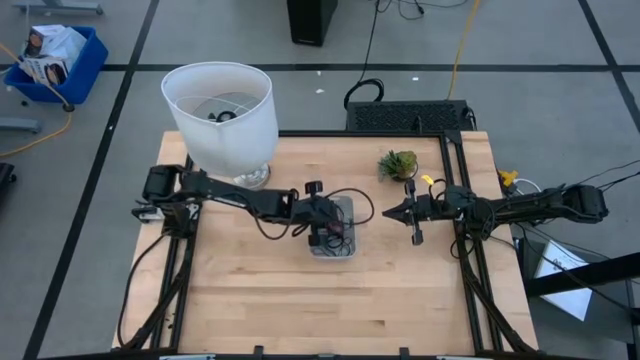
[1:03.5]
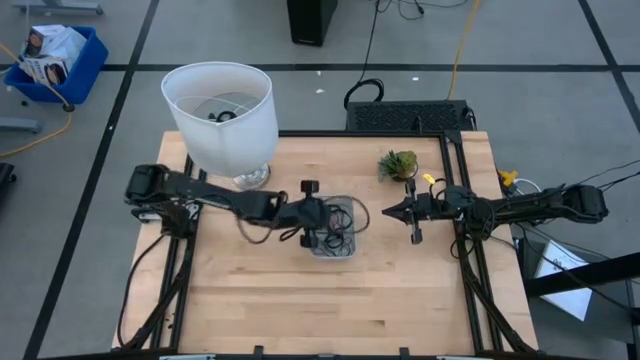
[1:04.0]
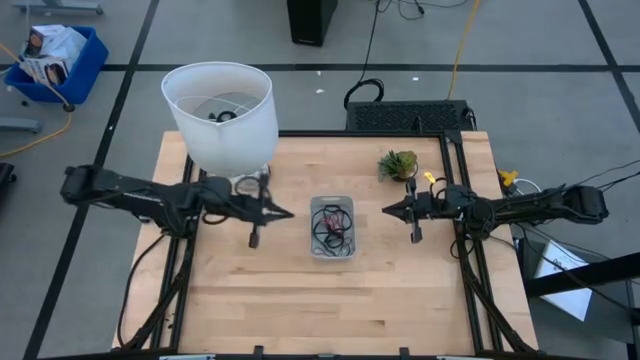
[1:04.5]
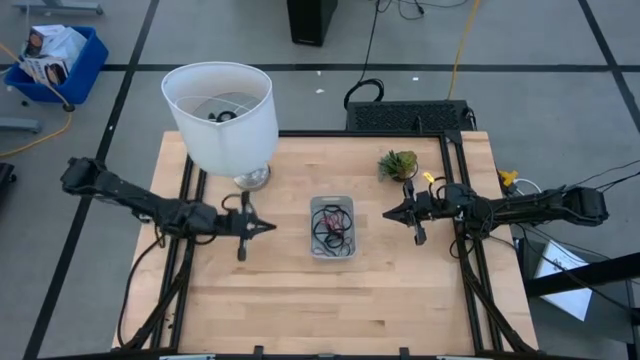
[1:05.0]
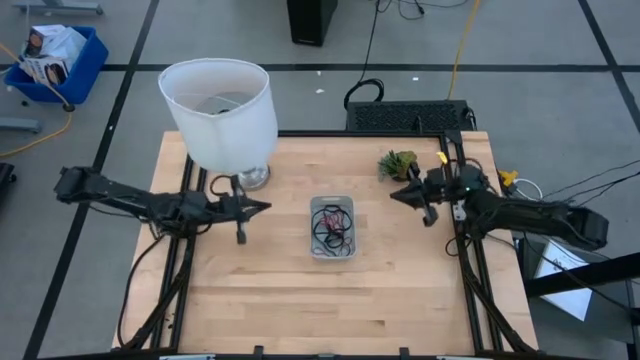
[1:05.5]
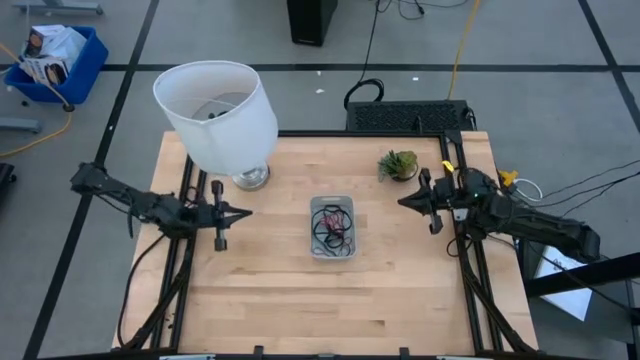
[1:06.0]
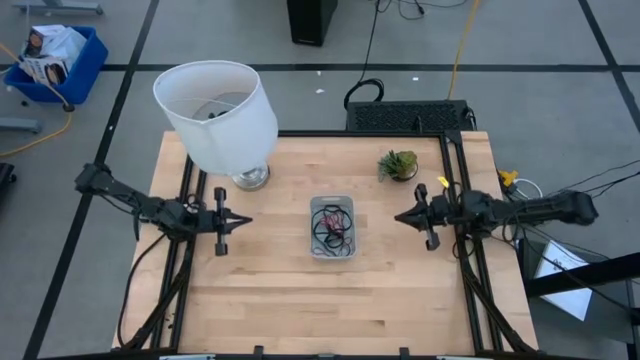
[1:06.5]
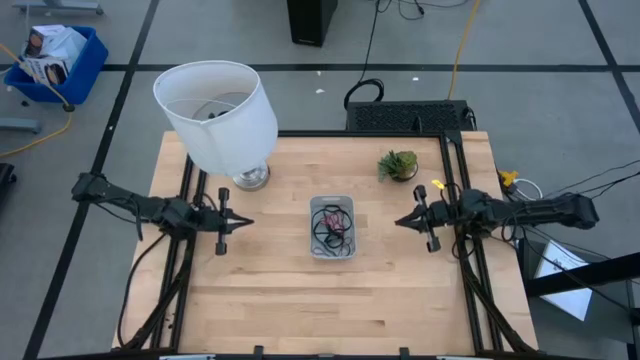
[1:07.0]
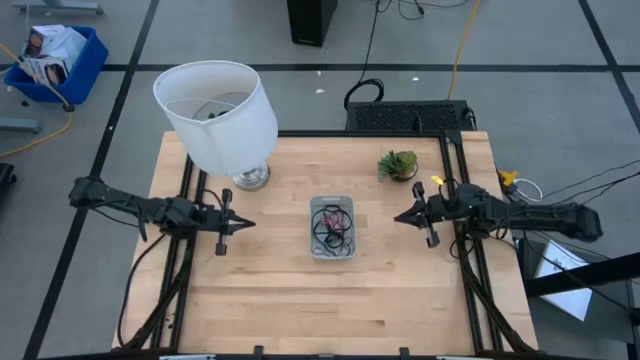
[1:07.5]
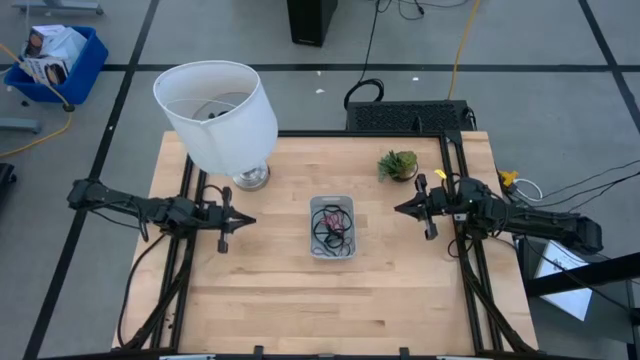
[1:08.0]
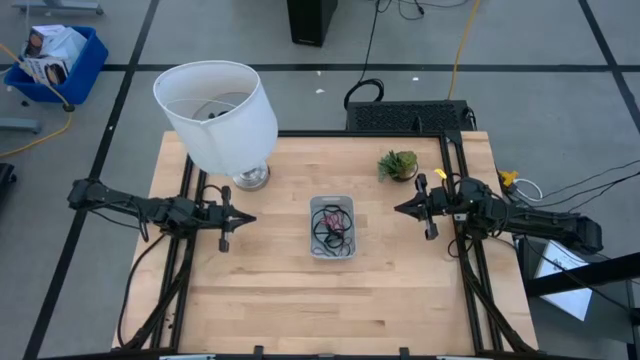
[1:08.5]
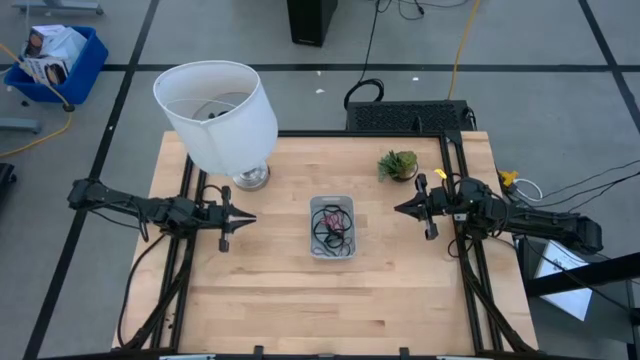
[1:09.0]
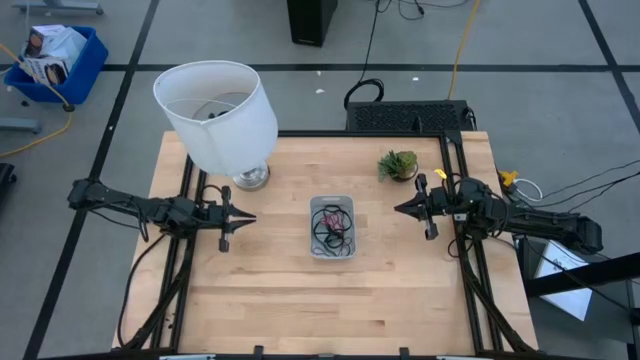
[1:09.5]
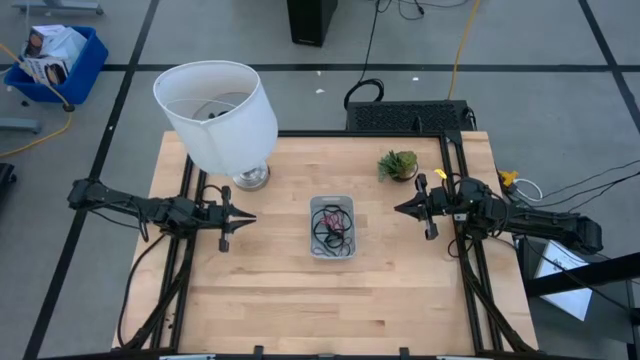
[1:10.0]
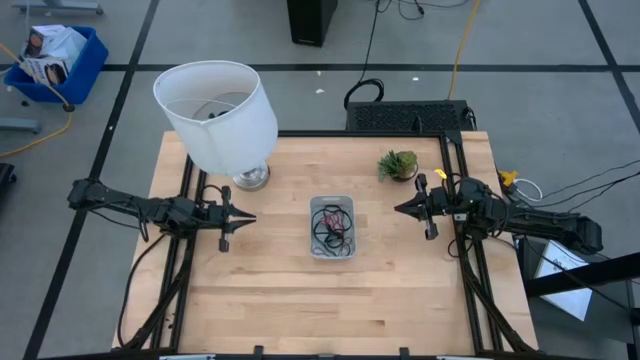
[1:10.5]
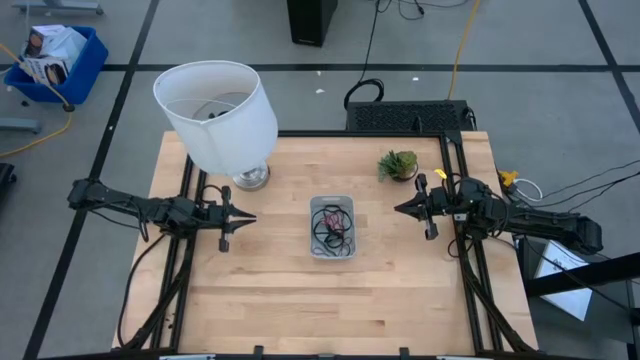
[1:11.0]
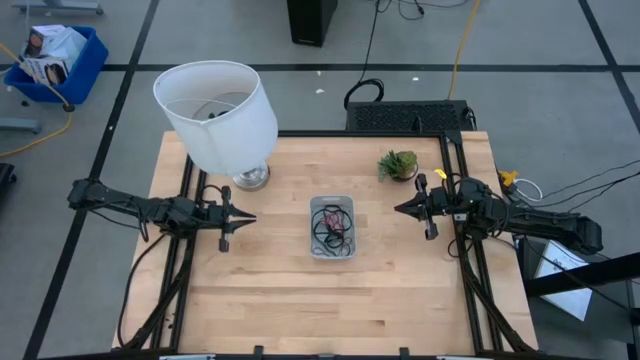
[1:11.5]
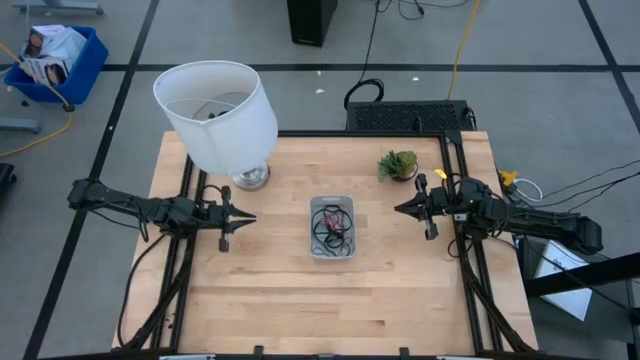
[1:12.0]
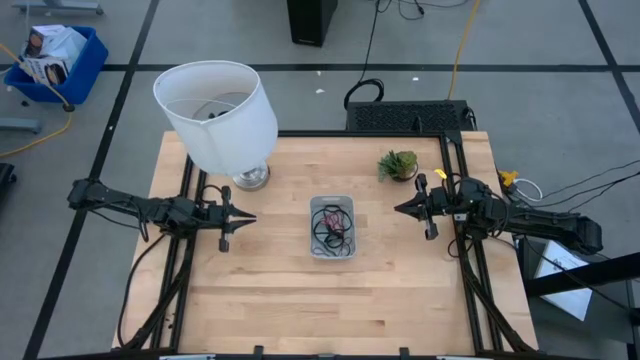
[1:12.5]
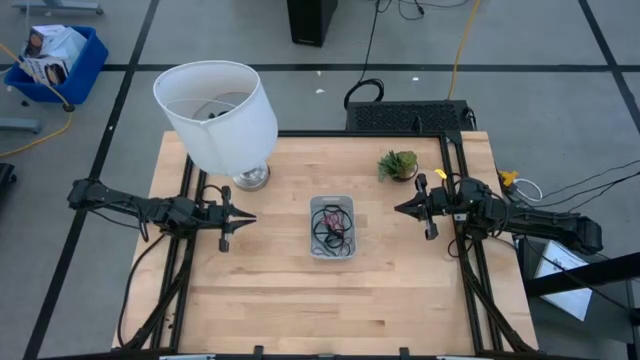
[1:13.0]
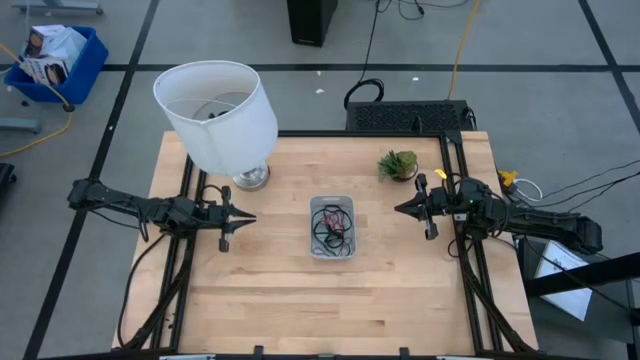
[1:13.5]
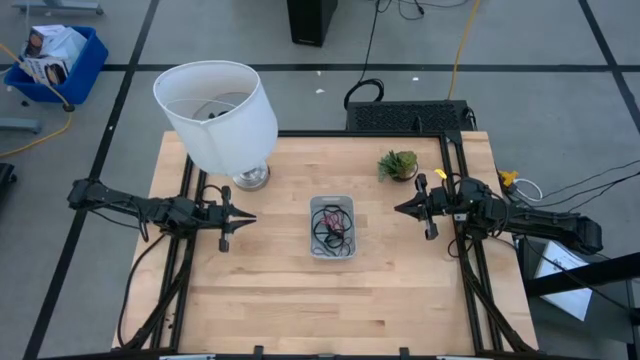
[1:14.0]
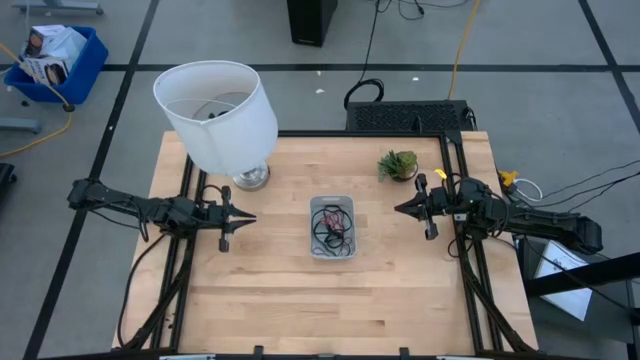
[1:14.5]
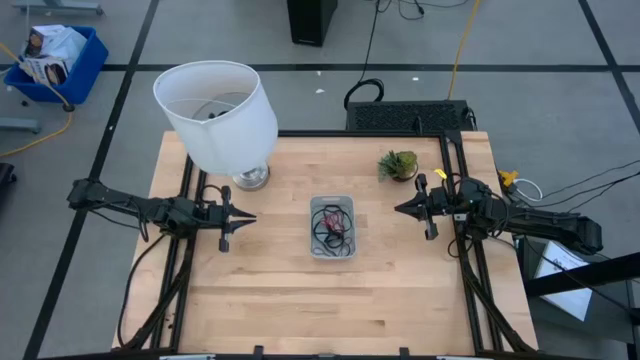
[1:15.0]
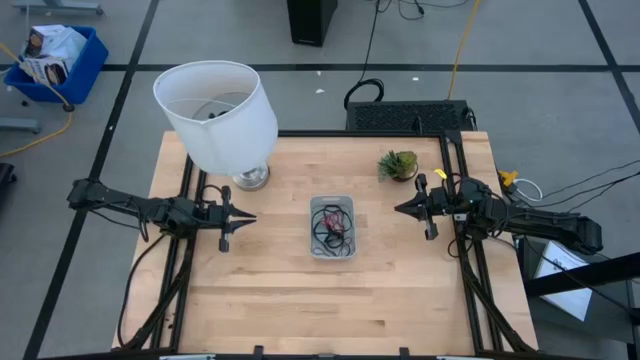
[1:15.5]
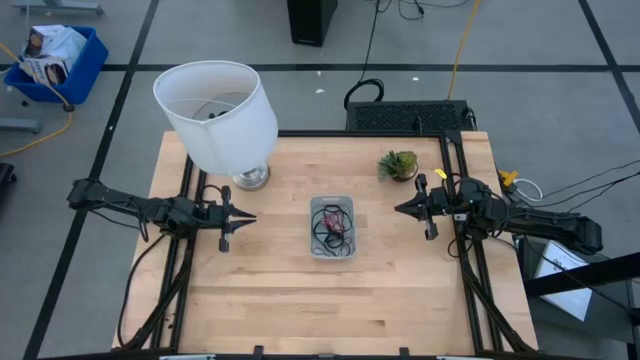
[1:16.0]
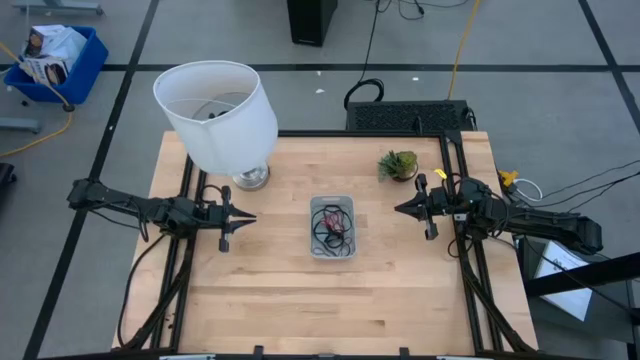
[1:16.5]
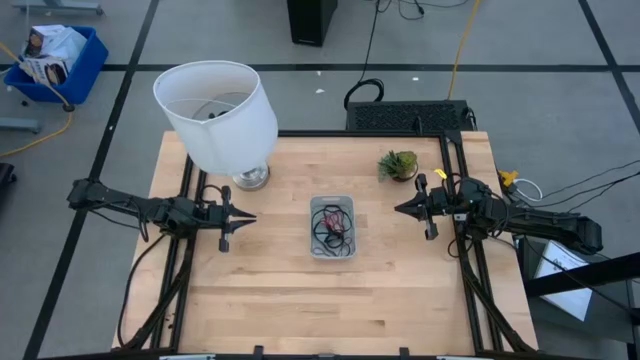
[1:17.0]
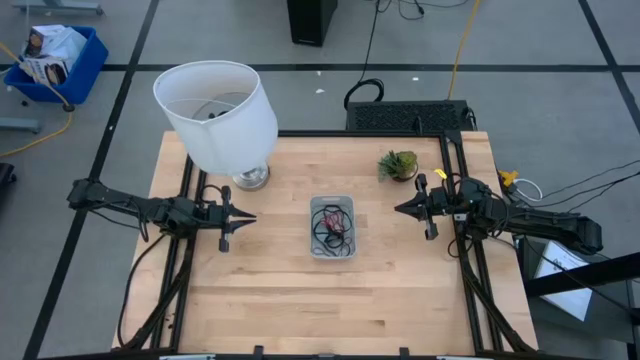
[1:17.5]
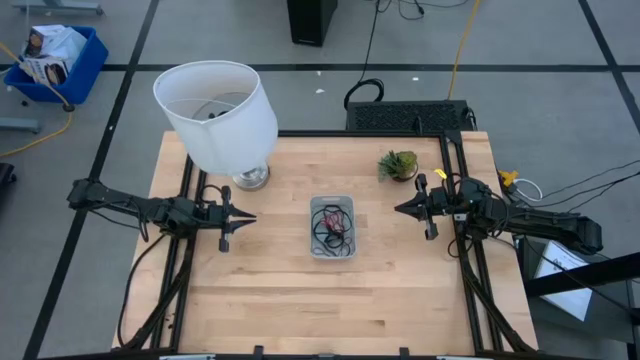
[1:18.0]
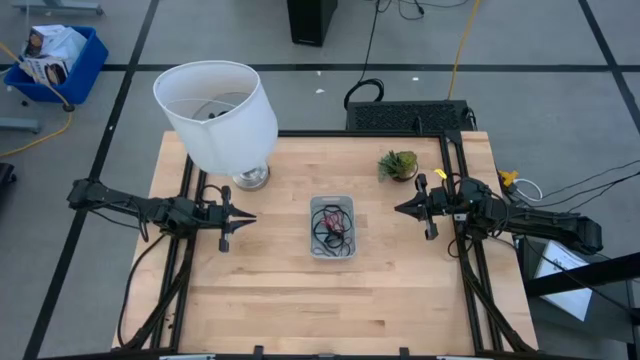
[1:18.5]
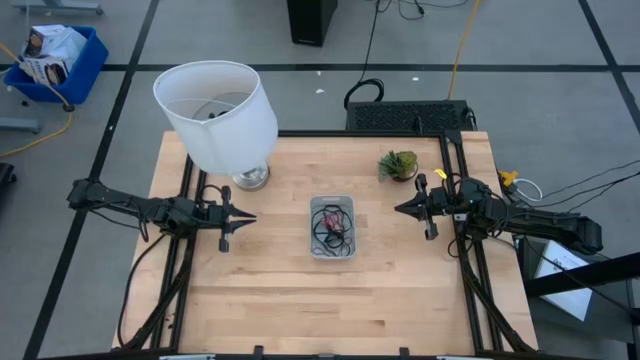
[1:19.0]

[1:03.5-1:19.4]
Task: Pick and place rubber bands into bin
Return to Home Position

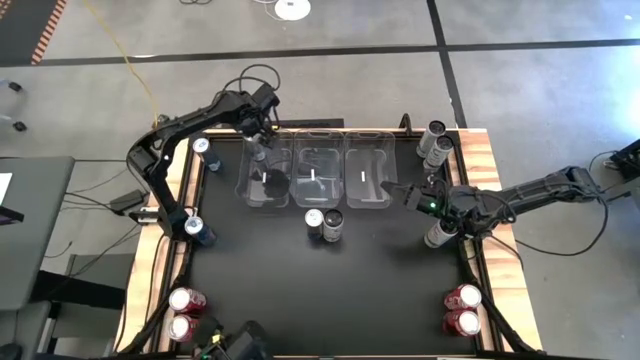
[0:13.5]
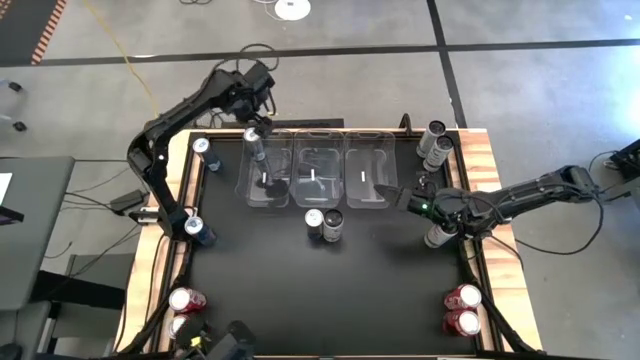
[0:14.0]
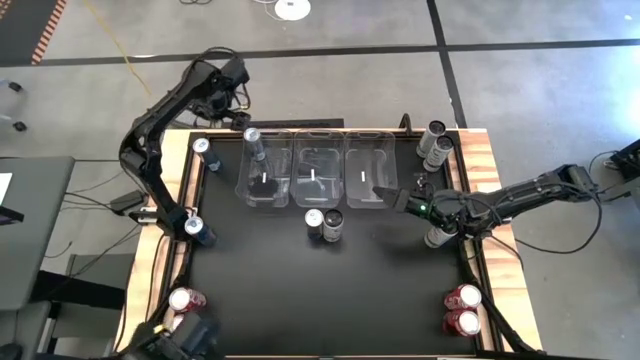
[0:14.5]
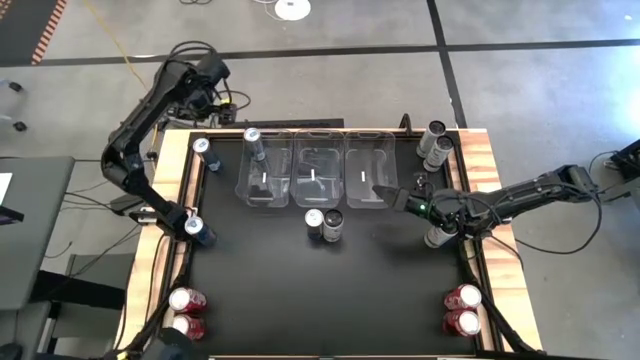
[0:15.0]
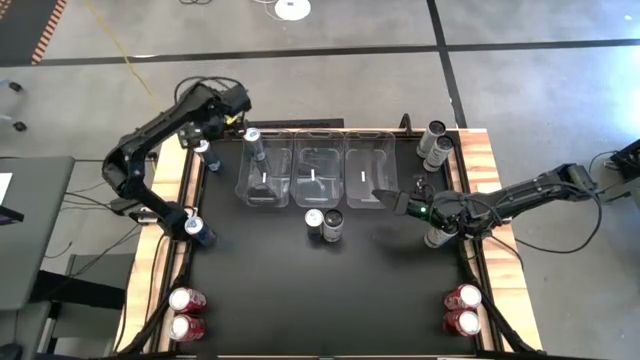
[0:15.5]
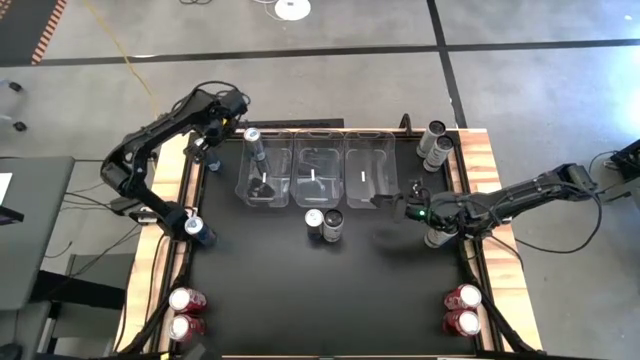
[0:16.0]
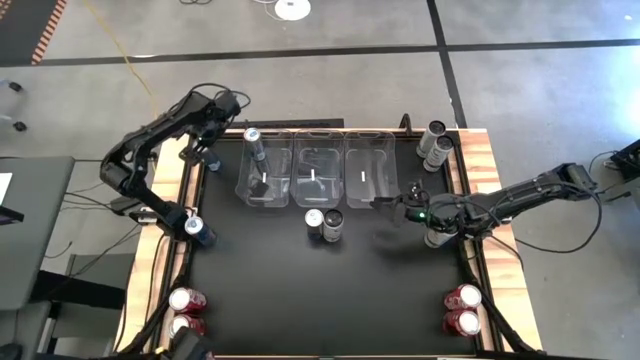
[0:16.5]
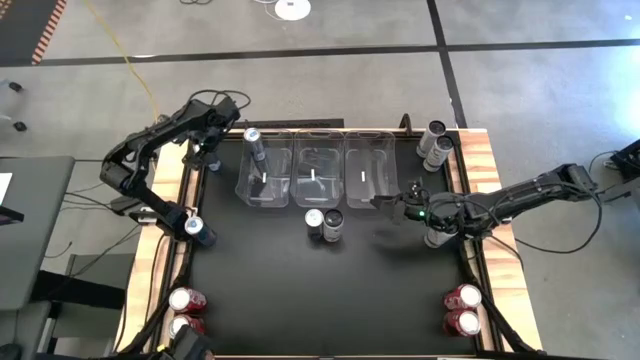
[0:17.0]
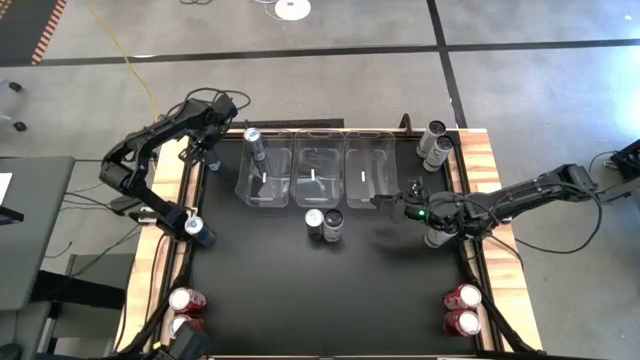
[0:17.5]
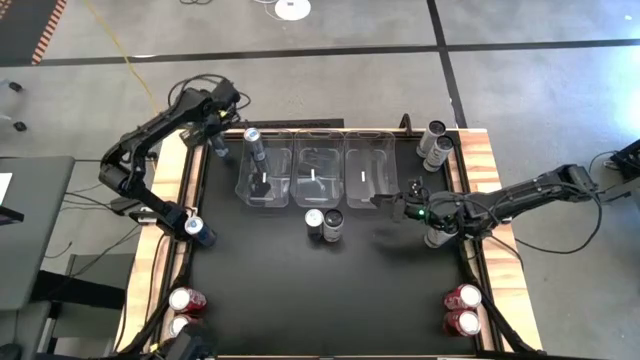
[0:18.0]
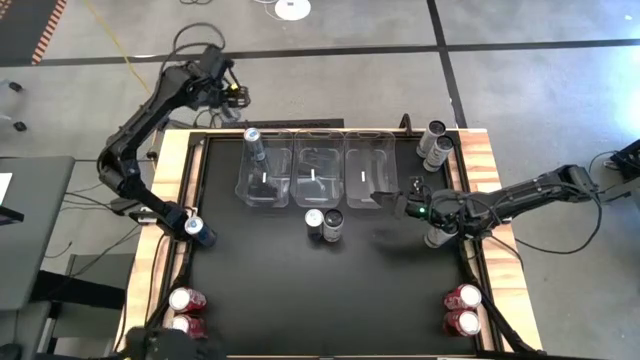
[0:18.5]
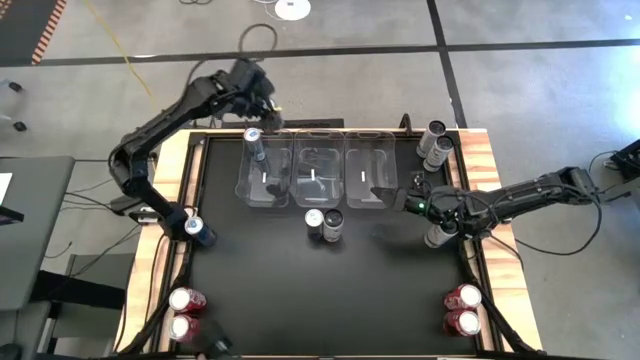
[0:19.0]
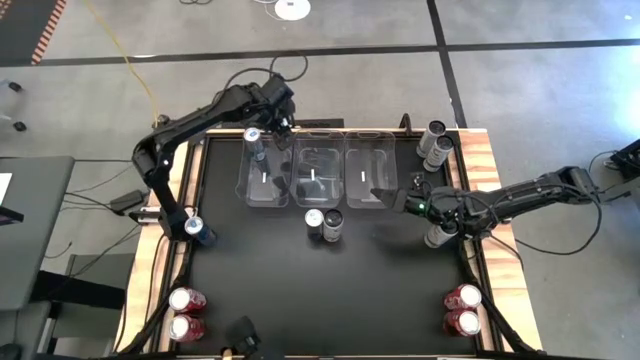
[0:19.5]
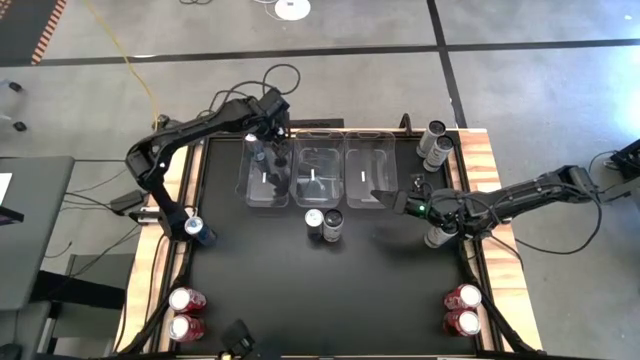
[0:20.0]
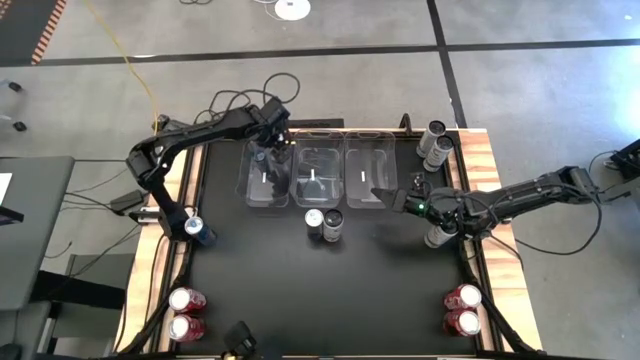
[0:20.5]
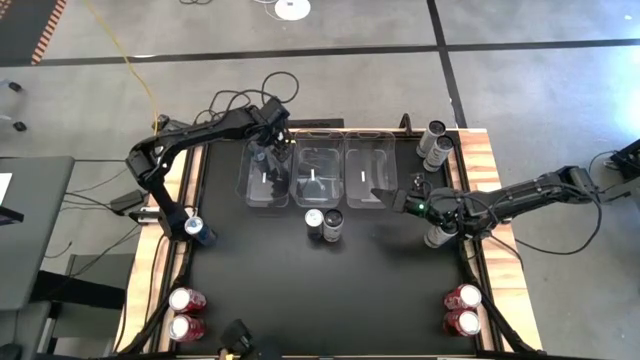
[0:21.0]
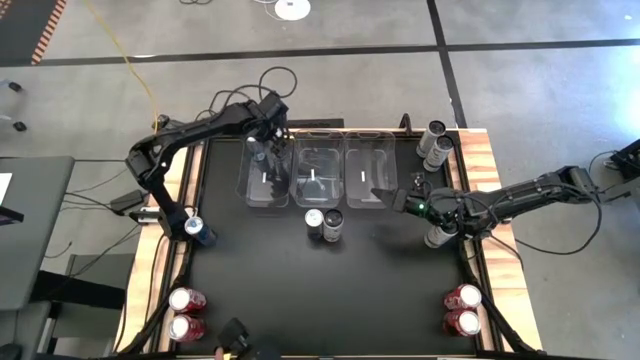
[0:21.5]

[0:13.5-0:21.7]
Task: Sort soda cans
Put the top blue soda can into the left transparent bin
